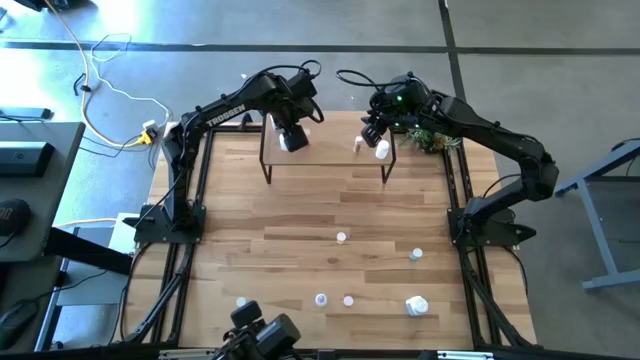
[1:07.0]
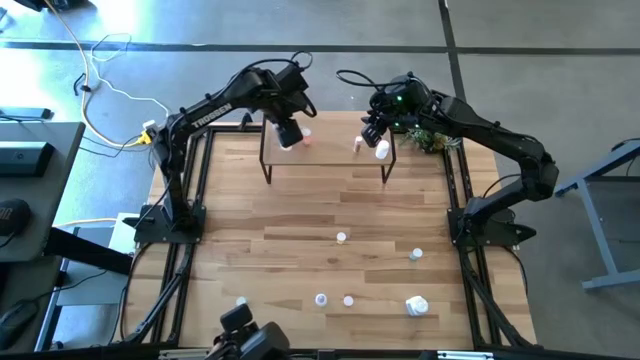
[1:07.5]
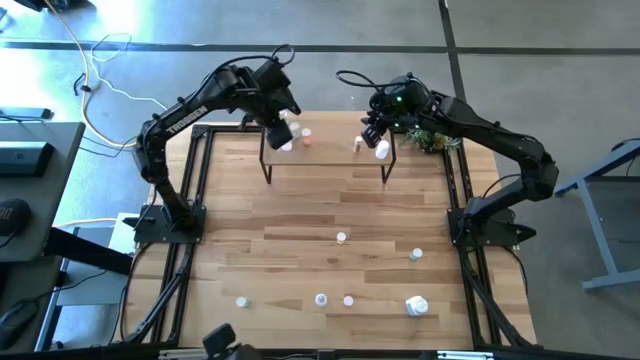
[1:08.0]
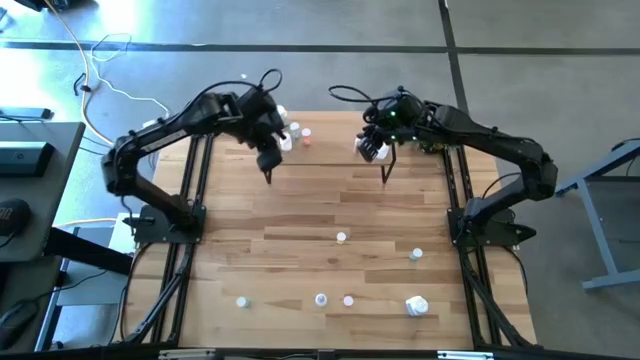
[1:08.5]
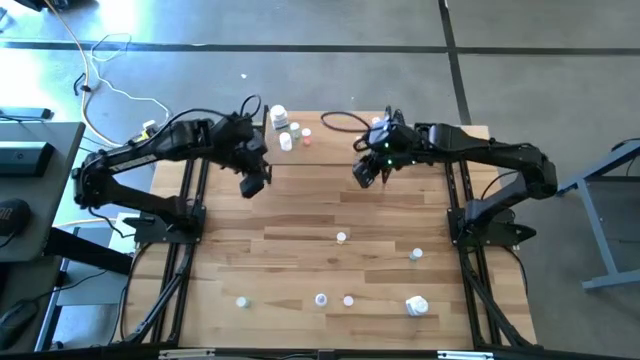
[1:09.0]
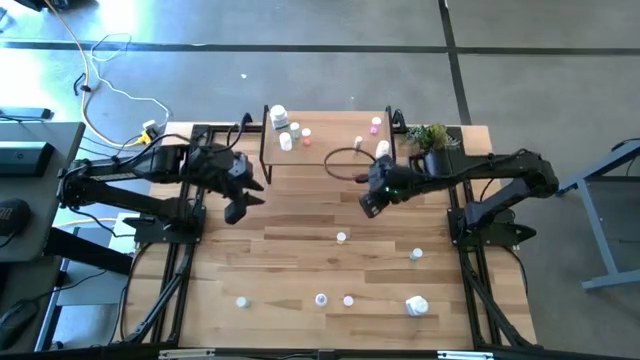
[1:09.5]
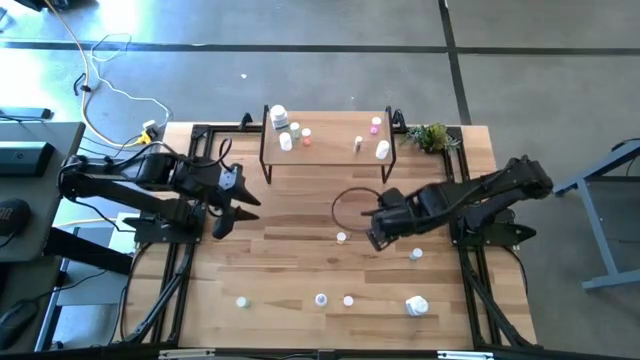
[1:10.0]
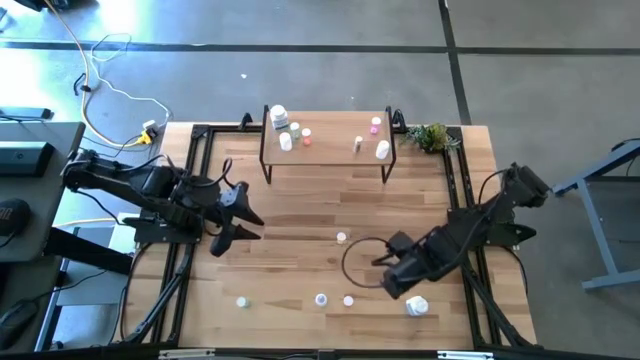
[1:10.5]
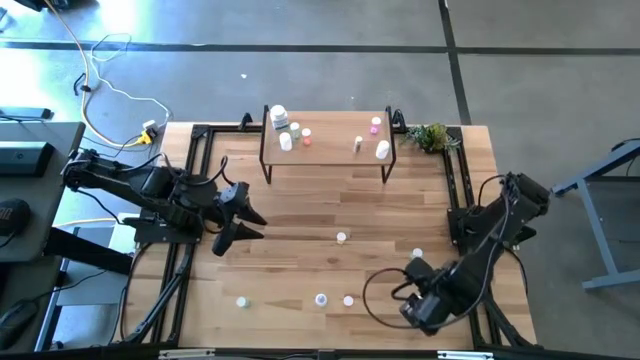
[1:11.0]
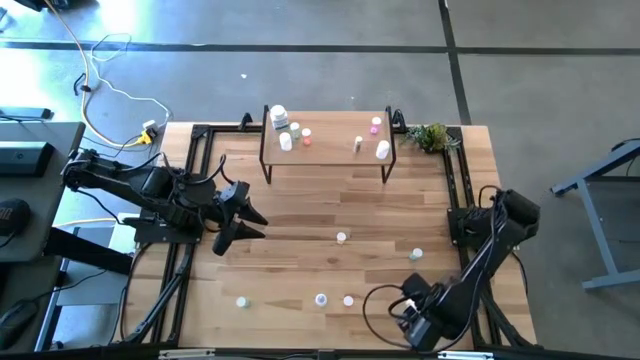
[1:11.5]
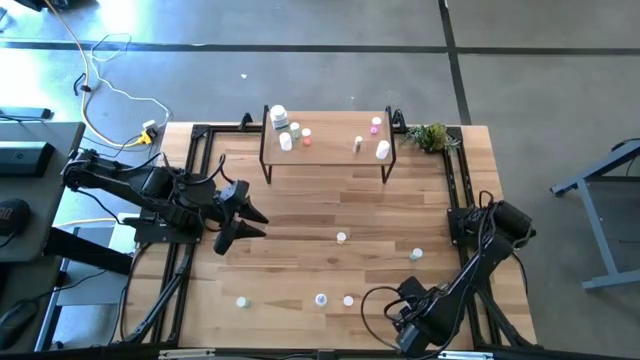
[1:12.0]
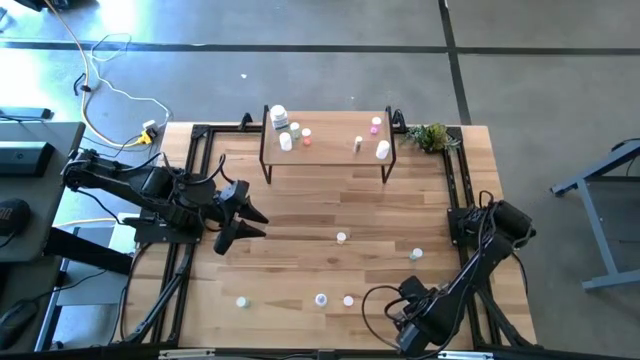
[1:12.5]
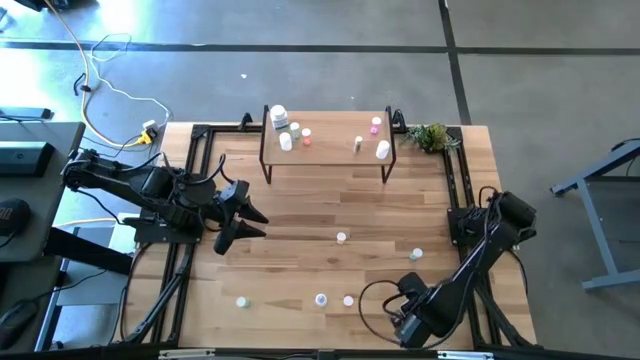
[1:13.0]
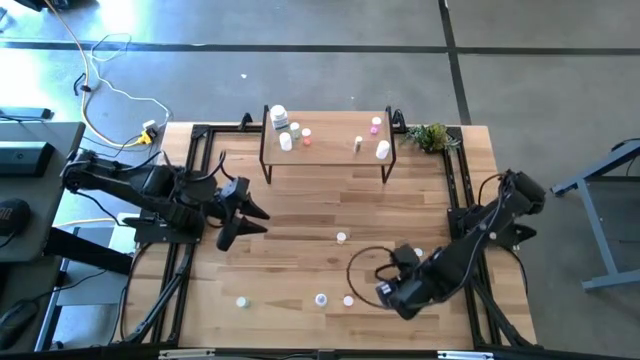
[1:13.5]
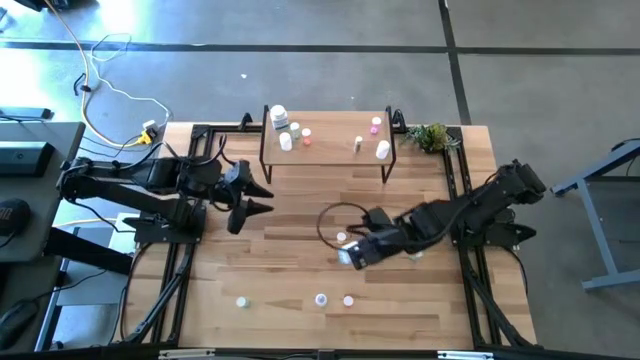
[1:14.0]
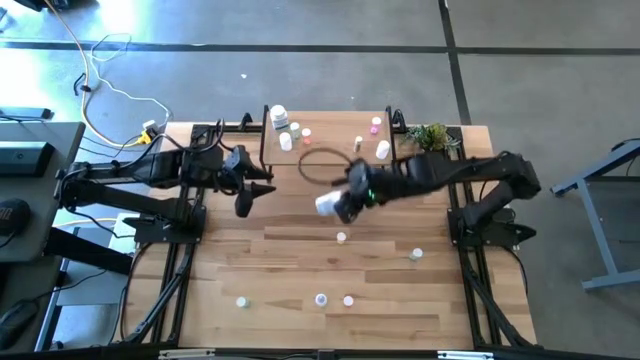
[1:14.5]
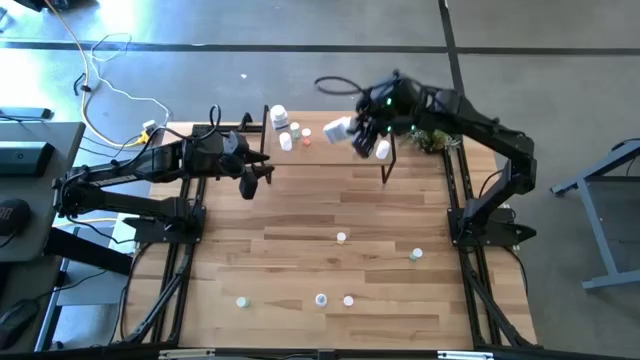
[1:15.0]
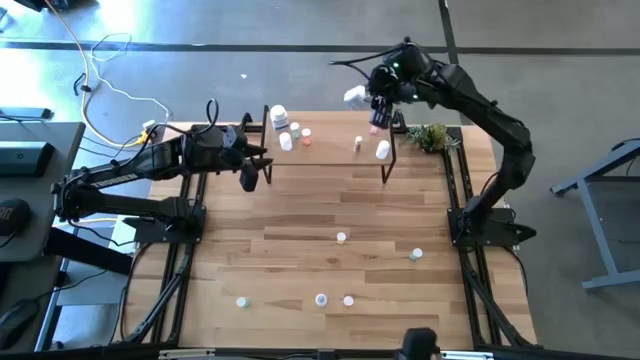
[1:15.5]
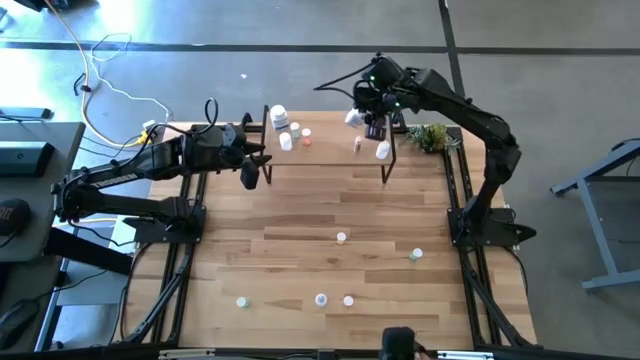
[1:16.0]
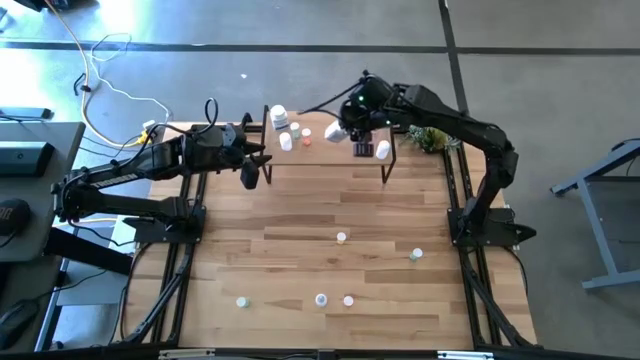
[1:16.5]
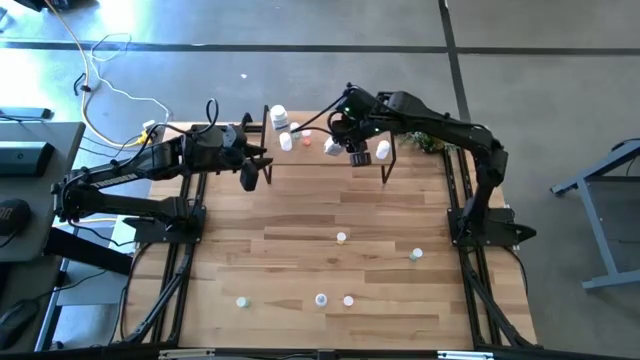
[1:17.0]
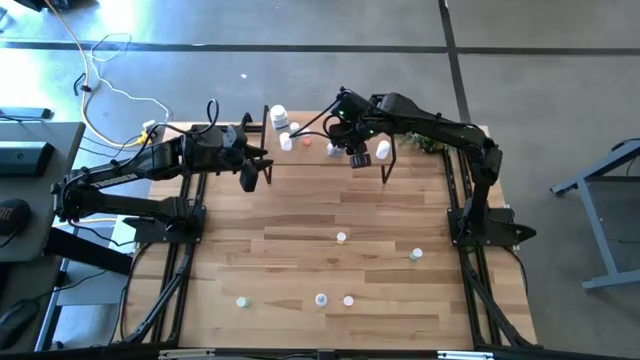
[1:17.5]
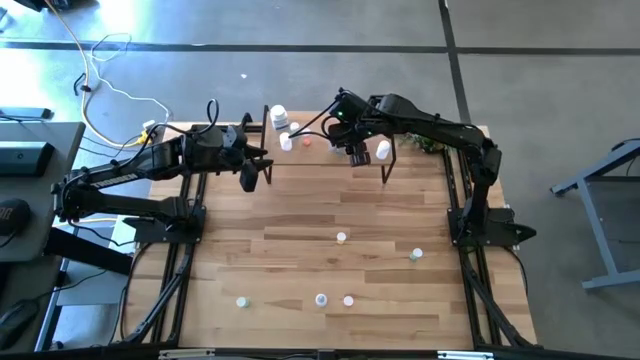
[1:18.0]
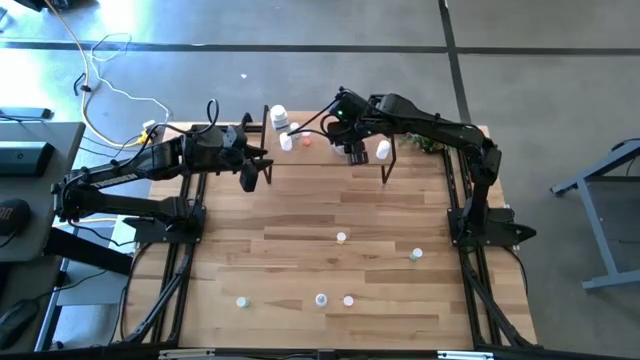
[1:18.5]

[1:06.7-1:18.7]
Task: Pick and place medicine bottles onto shelf by color
Put the white and blue pill bottle on the shelf

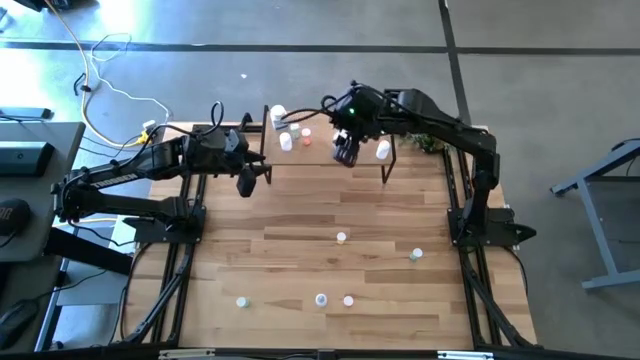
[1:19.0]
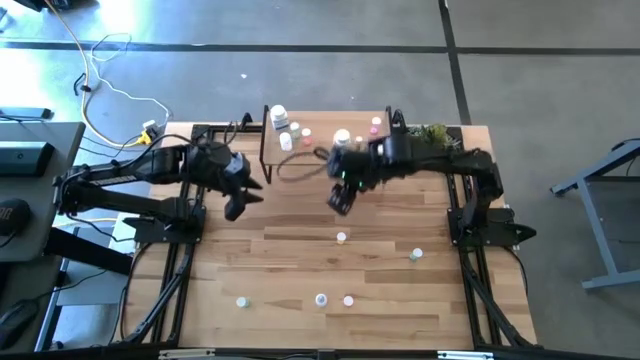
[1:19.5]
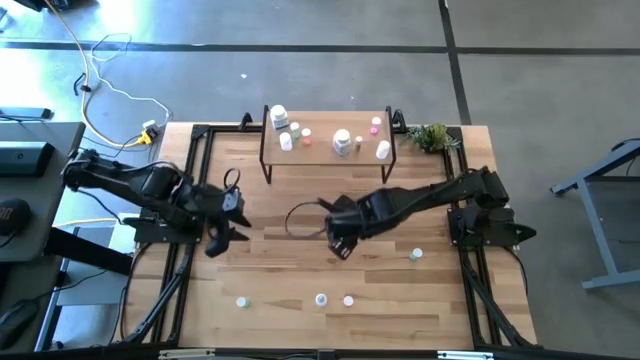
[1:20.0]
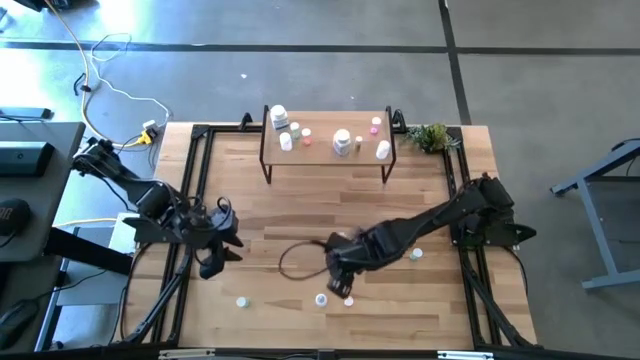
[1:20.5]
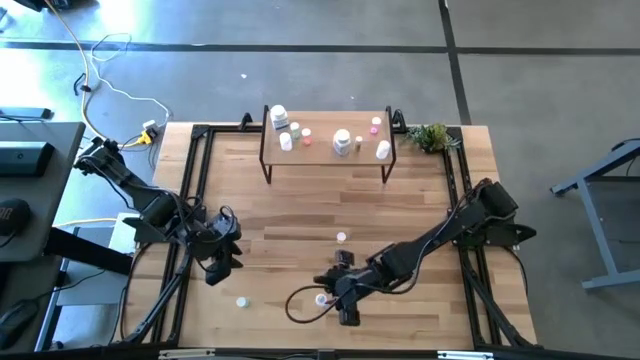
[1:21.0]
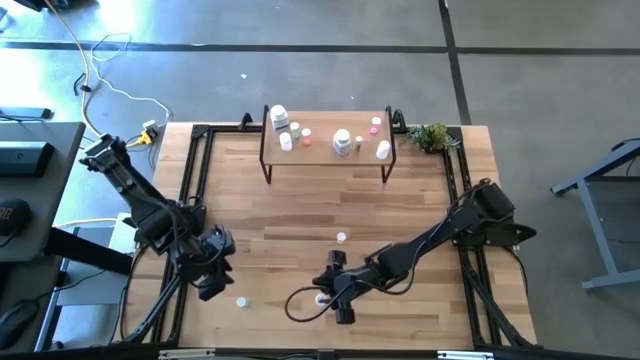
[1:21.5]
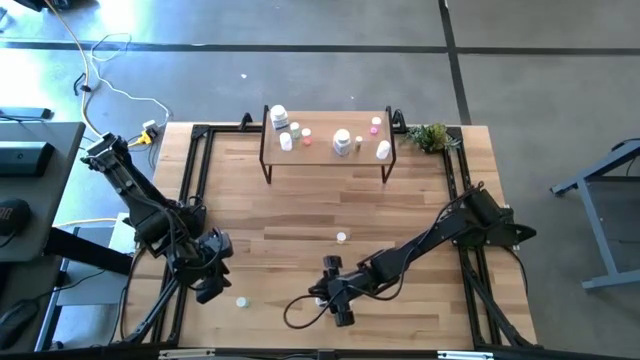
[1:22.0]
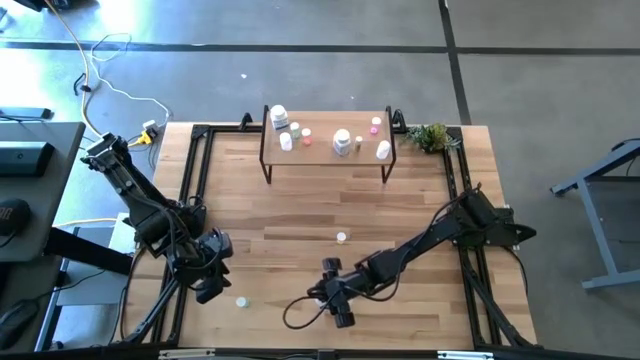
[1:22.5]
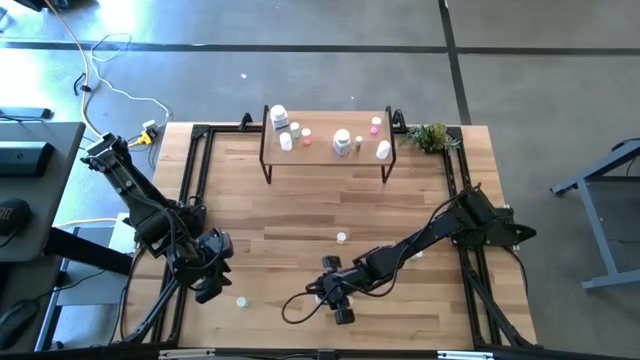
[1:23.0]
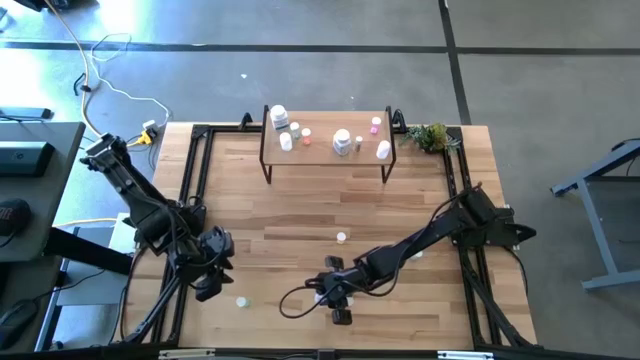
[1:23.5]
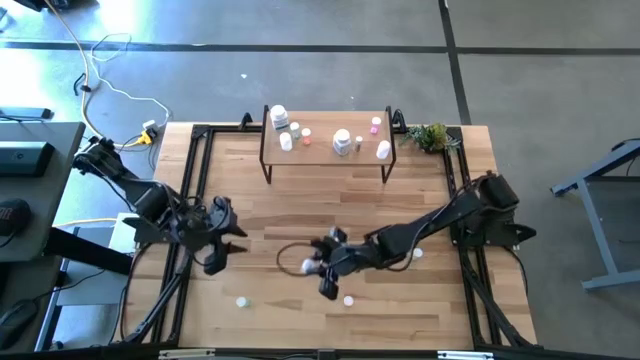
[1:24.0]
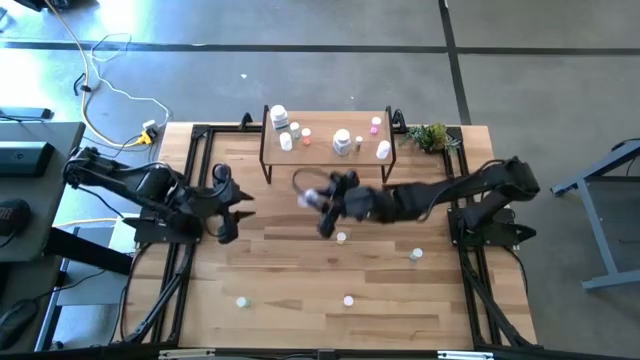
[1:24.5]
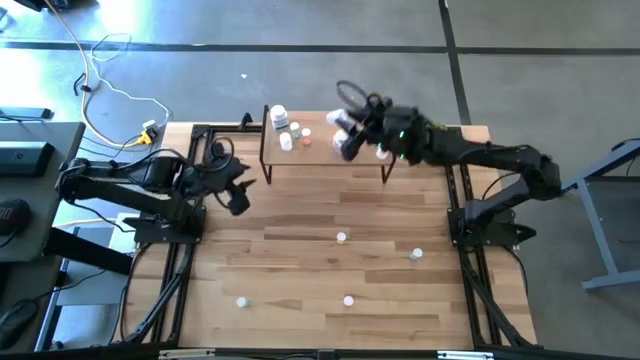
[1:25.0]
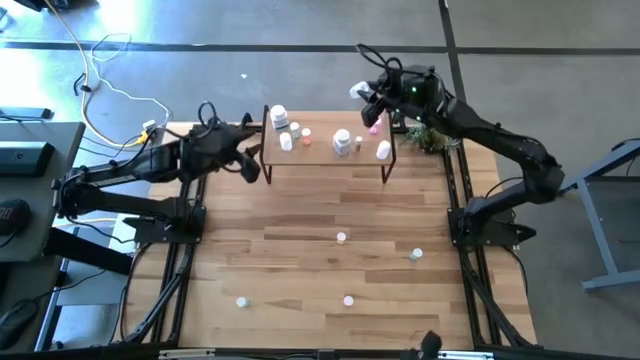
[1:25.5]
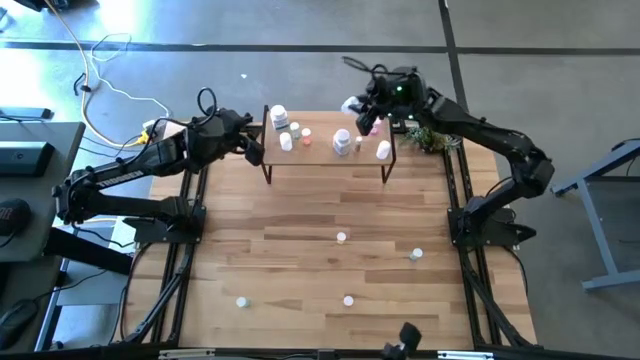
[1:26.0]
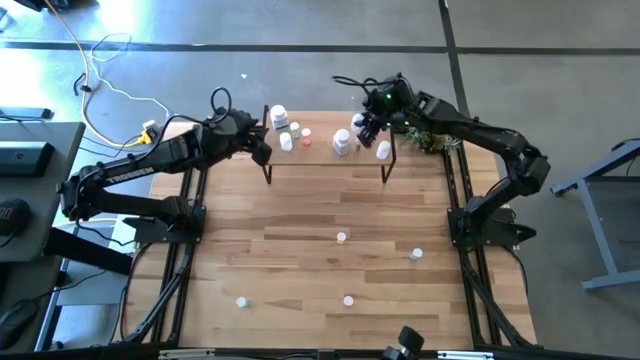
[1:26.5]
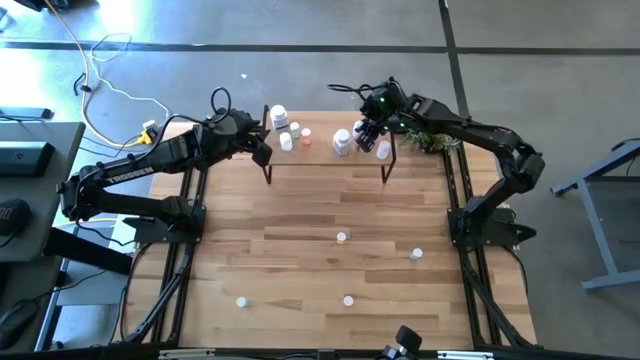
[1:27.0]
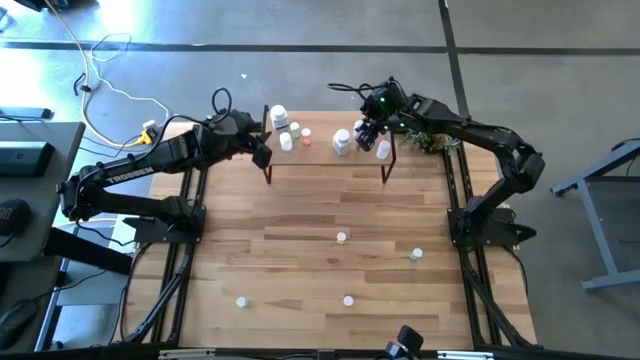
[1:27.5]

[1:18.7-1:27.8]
Put the transparent pill bottle on the shelf
